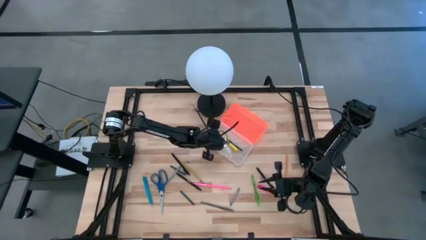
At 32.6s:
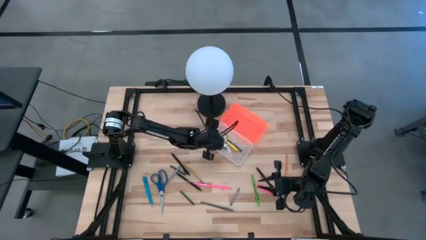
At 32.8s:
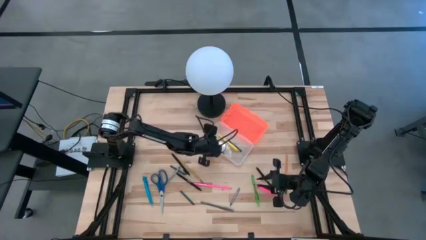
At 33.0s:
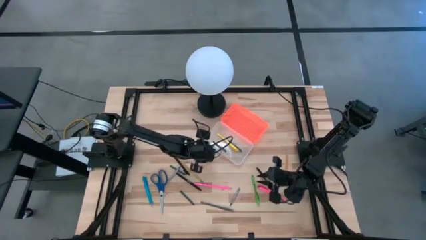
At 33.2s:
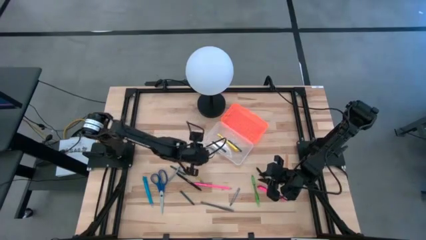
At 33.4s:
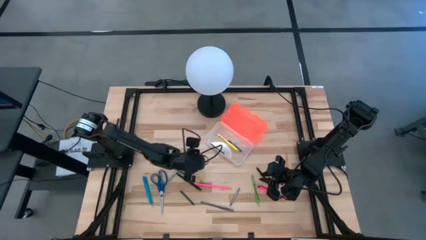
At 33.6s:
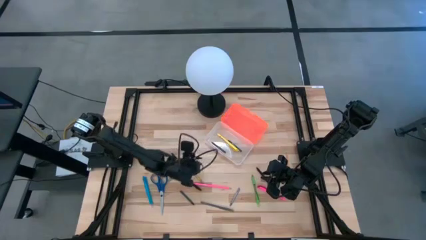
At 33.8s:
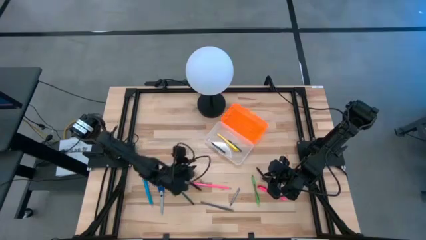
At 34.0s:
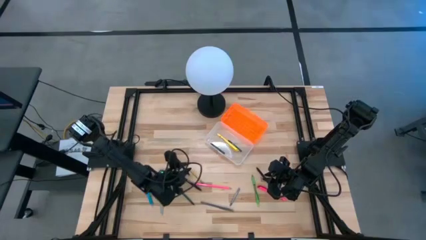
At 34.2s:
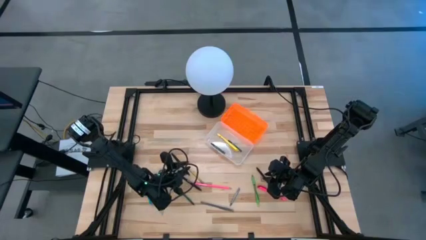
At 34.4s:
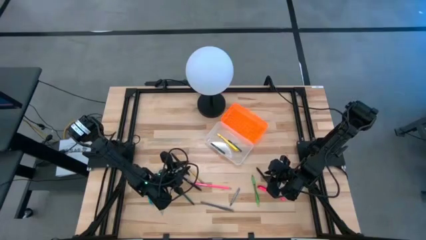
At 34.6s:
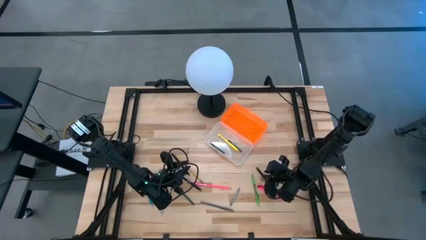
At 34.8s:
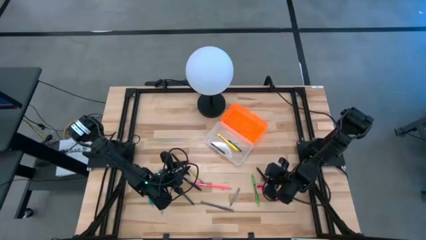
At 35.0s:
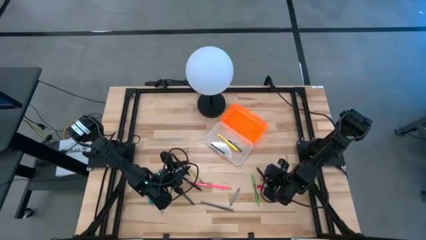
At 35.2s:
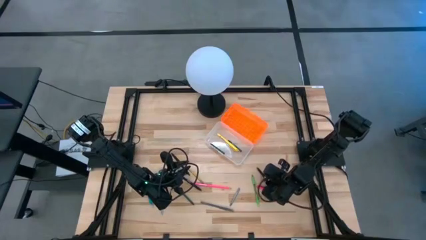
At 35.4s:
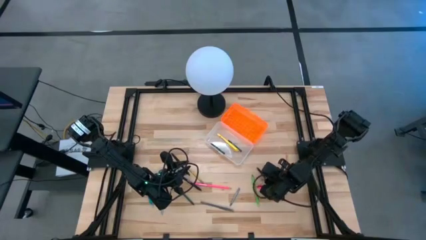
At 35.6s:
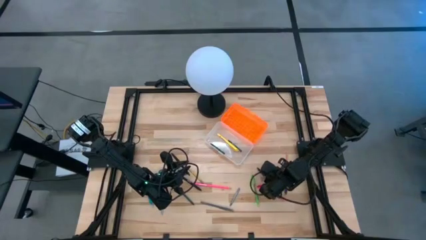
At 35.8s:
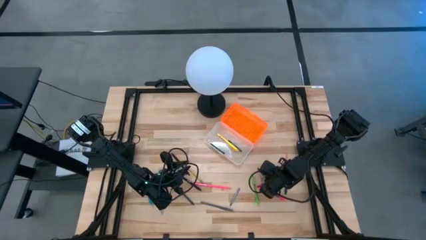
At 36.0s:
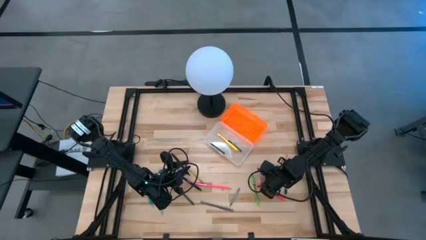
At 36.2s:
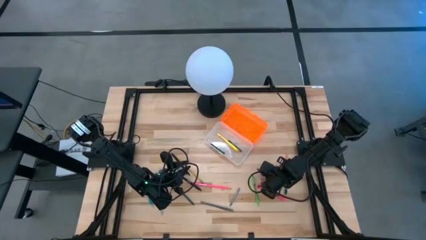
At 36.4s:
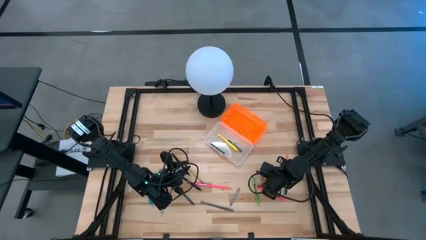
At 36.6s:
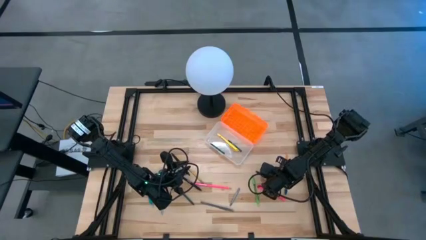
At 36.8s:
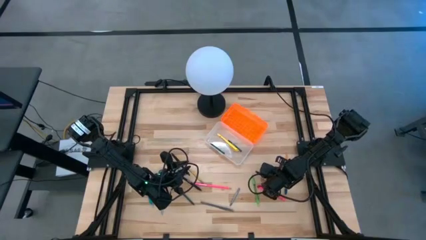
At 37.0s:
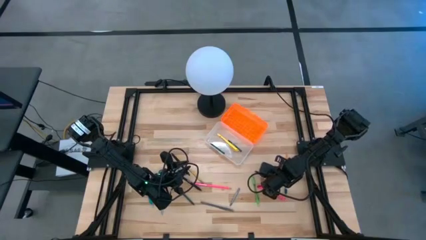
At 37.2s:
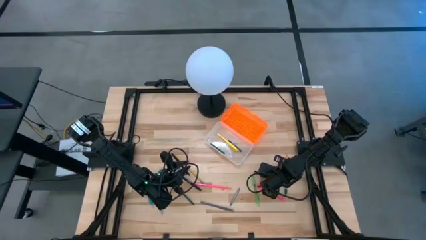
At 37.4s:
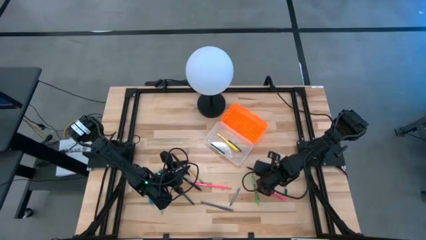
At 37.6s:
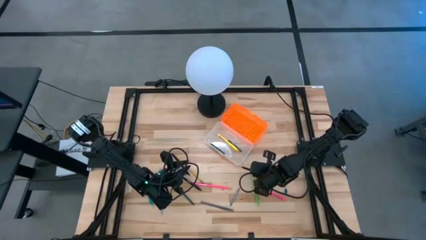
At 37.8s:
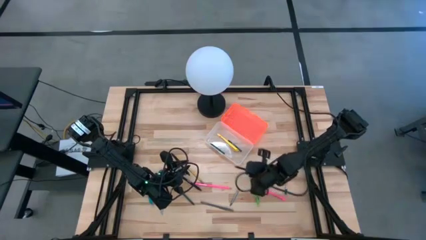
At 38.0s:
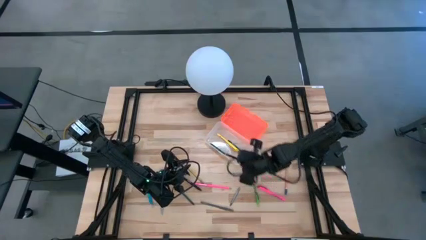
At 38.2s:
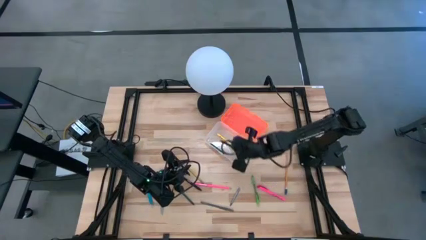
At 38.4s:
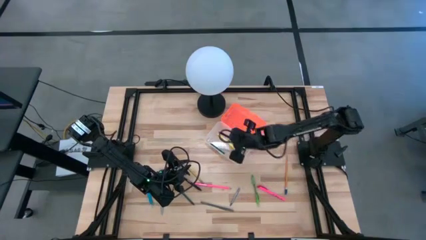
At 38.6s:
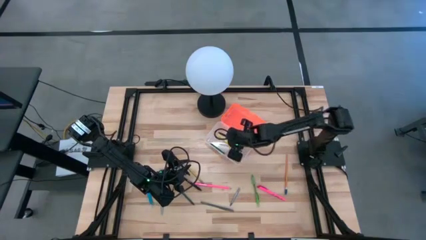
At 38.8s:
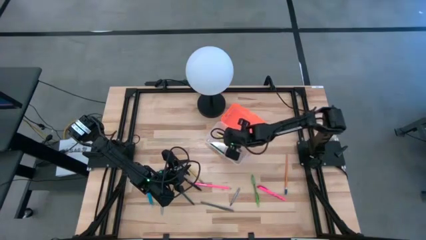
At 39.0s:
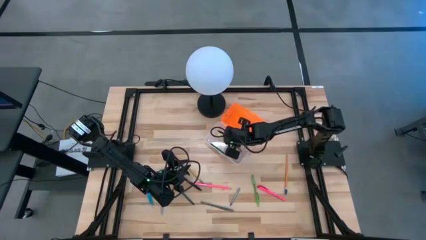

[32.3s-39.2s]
Task: Pick & place school supplies into a supply box
Put the black pen into the orange supply box

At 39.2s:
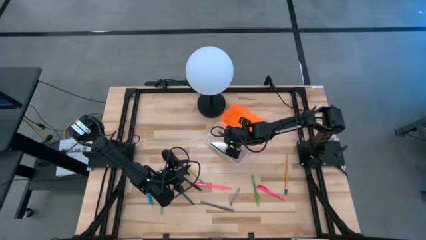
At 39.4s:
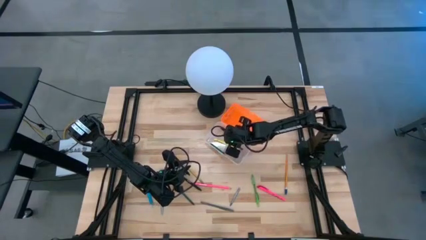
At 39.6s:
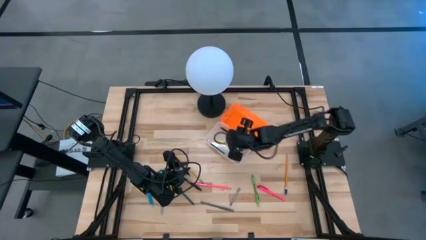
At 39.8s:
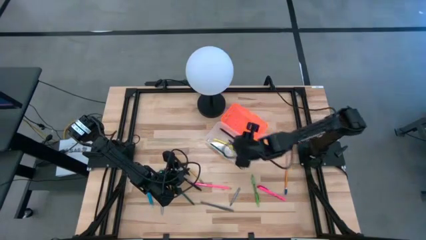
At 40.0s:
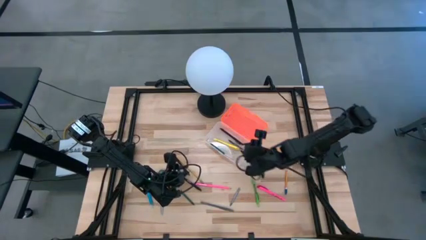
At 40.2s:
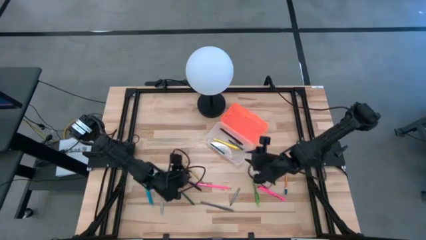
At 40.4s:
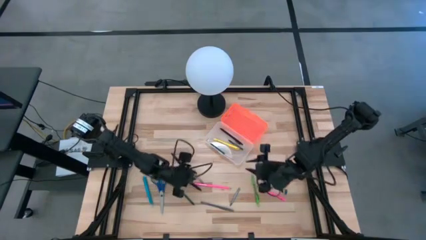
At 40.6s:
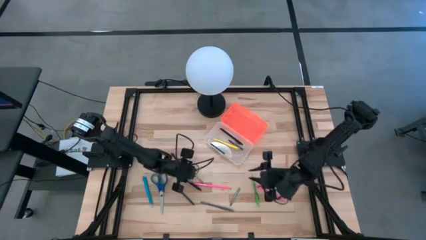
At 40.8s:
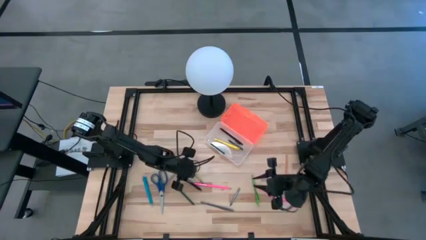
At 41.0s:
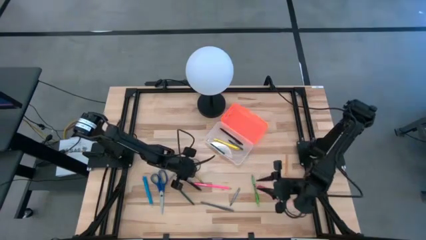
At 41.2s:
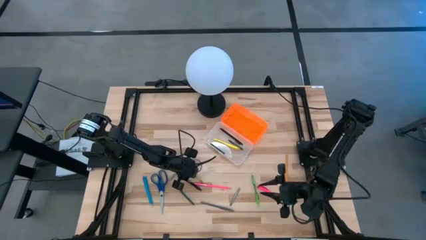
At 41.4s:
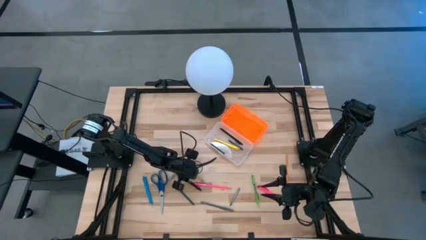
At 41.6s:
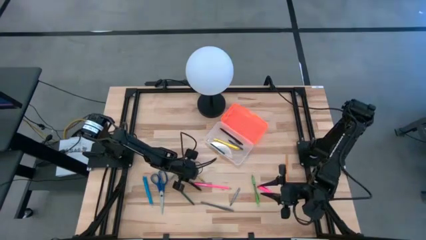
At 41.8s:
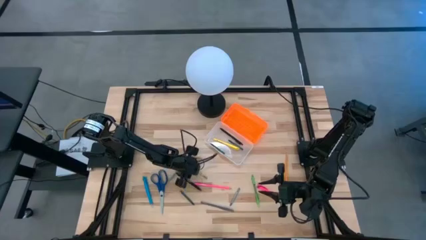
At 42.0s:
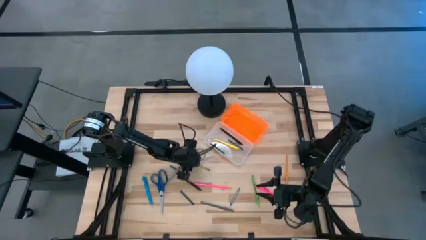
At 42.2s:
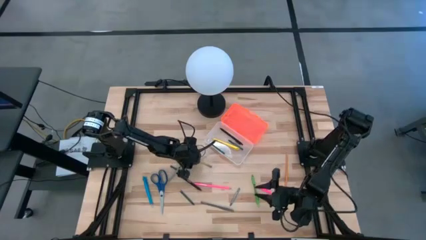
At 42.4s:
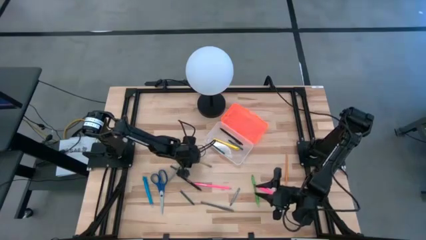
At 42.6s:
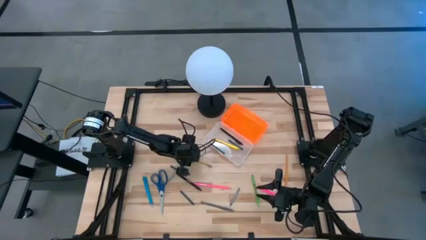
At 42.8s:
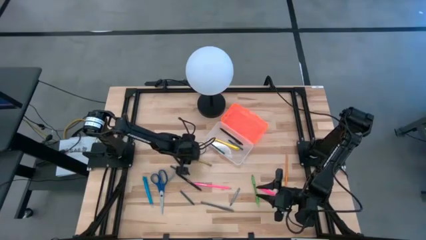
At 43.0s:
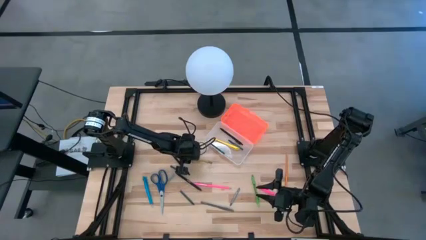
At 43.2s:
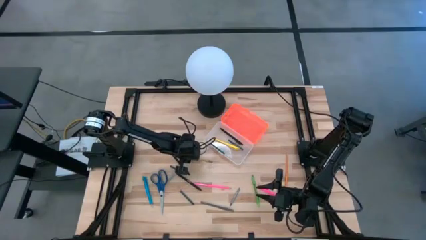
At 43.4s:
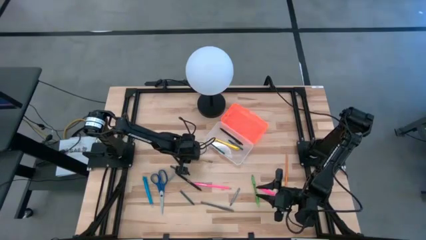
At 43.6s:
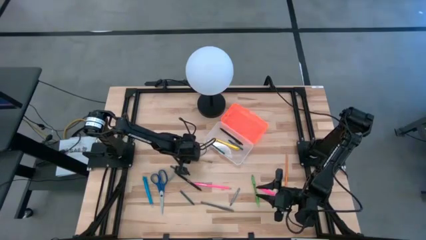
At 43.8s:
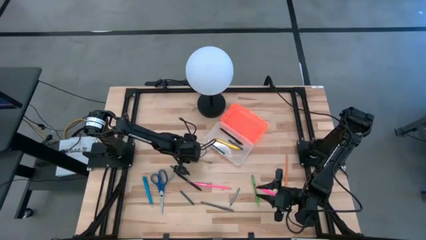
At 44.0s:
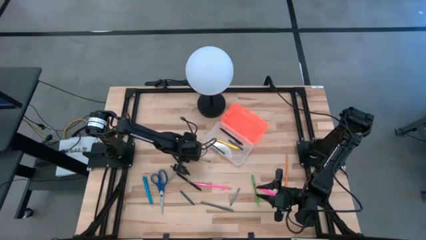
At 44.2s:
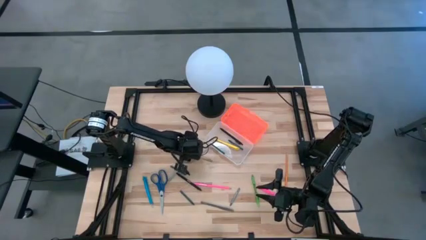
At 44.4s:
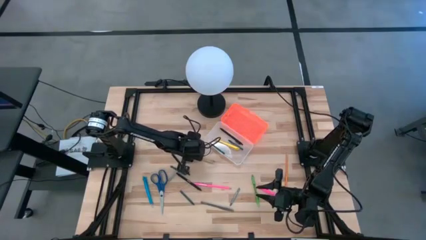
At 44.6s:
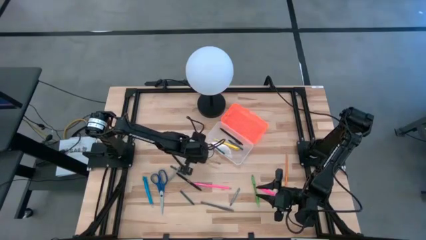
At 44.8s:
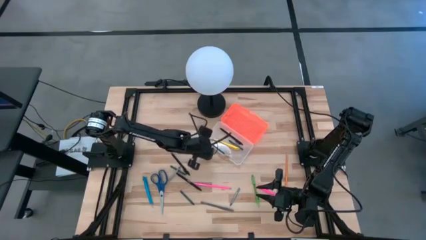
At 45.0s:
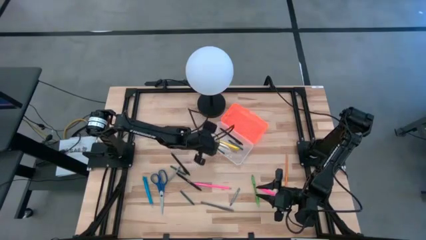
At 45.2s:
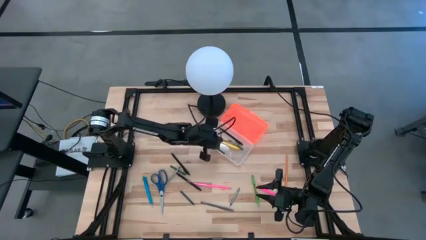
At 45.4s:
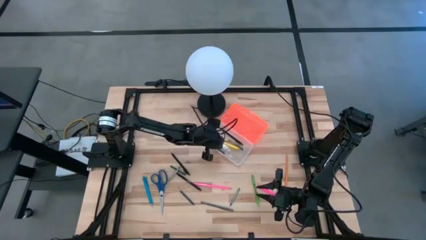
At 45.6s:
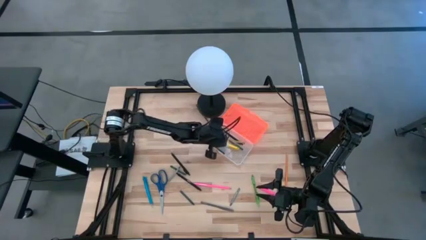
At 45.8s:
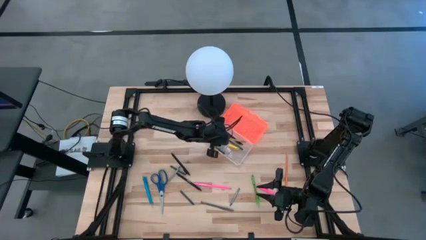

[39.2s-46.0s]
Put the yellow pencil into the orange supply box

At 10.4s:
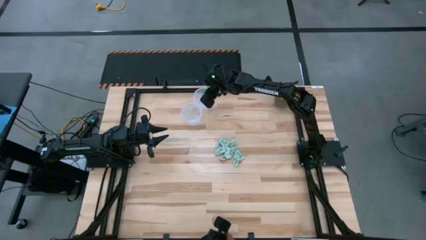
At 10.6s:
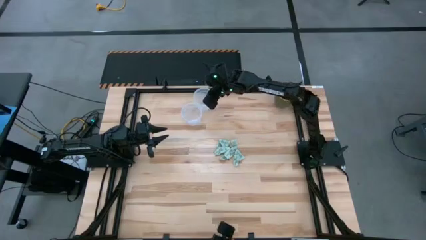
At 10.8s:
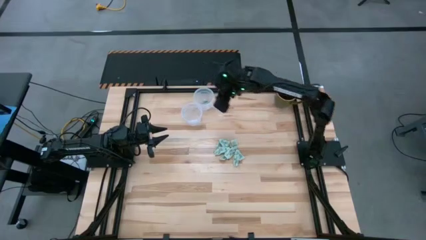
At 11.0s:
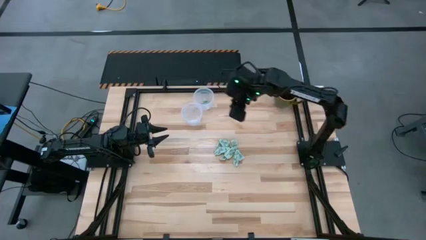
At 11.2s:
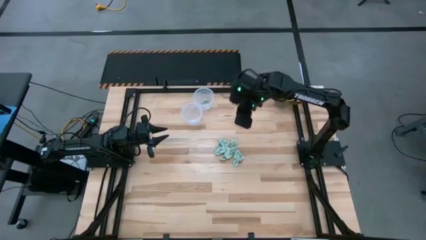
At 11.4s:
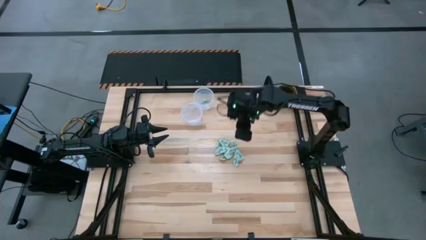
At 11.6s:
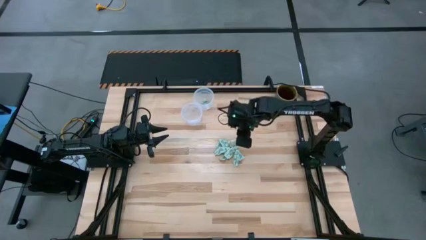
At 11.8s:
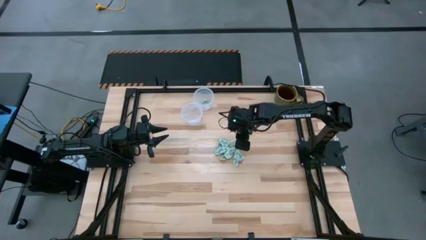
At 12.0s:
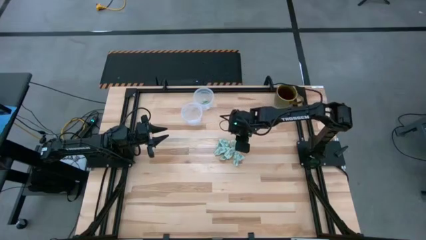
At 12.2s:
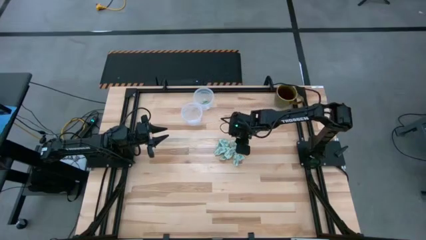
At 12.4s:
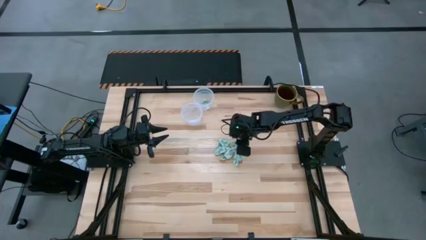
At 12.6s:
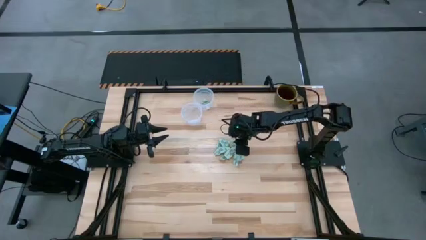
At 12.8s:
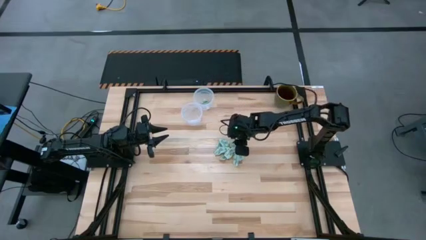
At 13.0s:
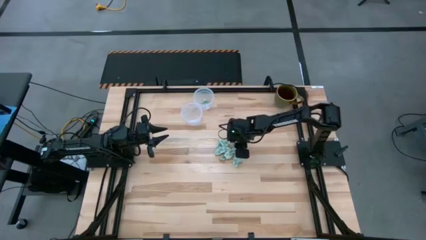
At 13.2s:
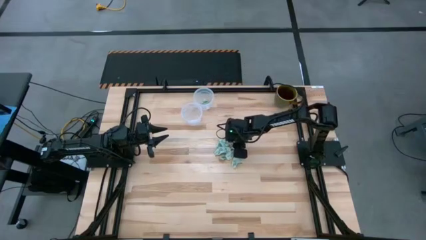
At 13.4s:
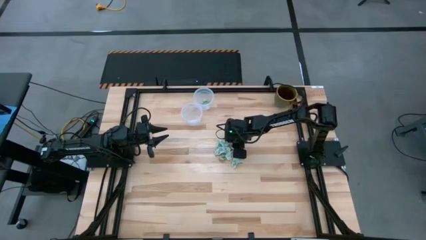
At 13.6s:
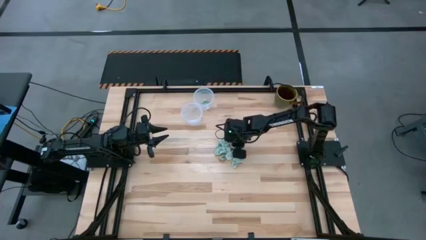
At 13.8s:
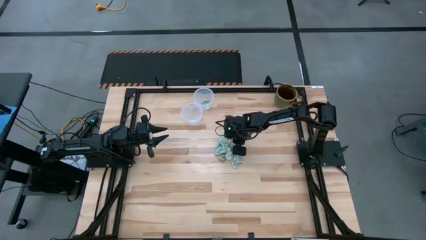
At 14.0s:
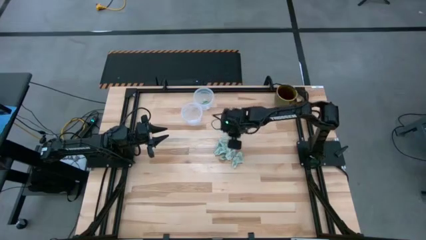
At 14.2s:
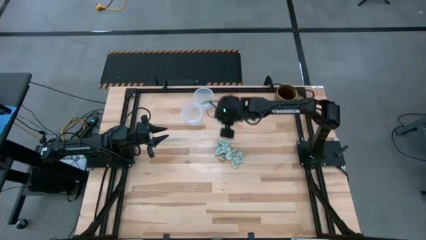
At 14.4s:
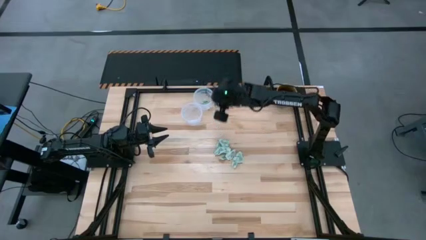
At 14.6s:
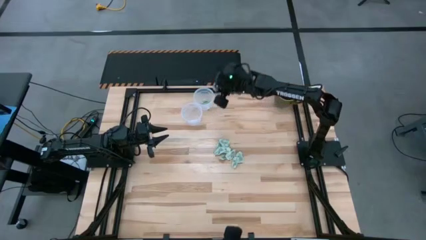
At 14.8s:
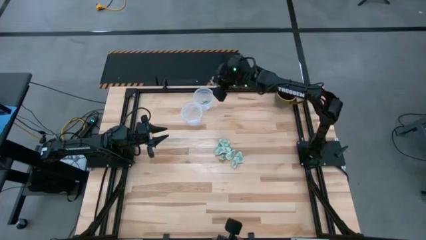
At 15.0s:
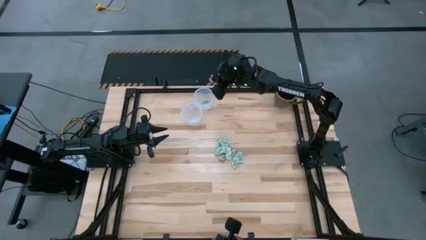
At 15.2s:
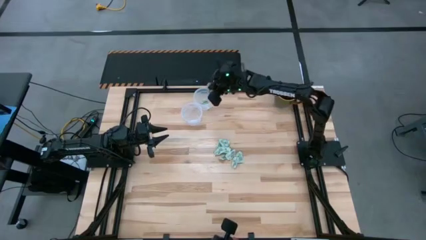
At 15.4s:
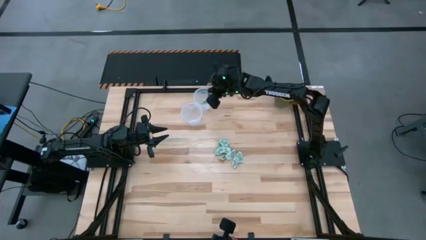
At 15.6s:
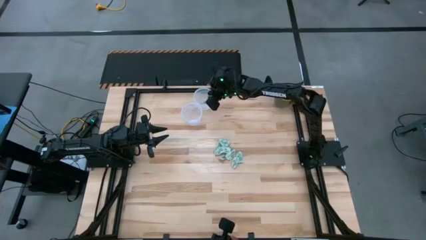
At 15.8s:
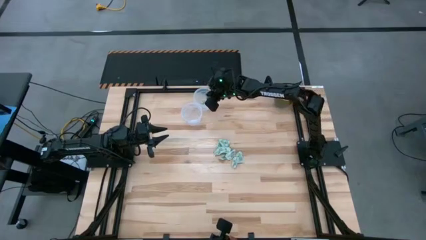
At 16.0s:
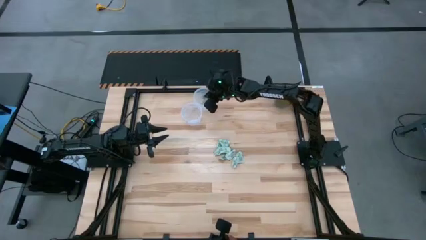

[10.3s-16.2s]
Task: Pick and place items into bin
Put the stevia packet into the top bin
